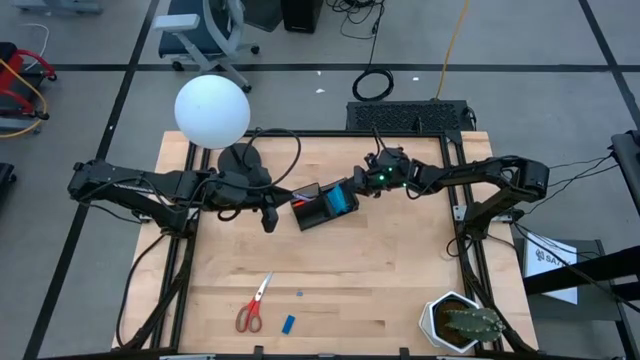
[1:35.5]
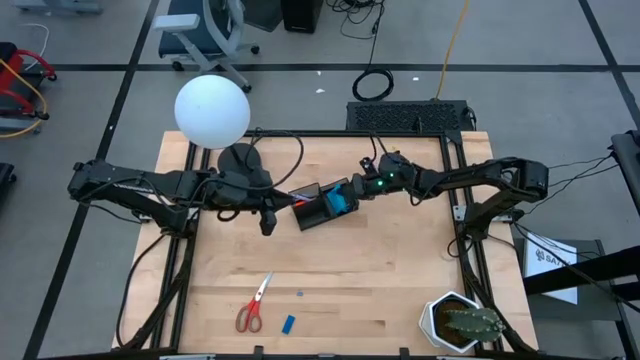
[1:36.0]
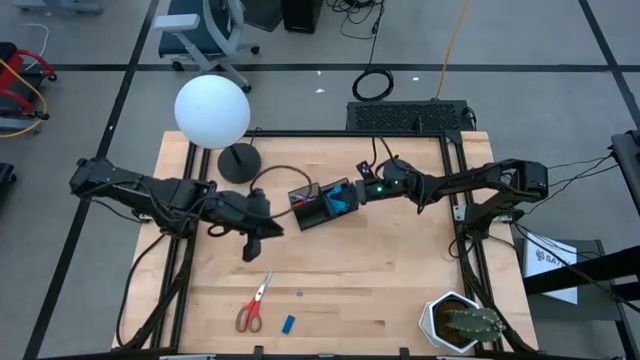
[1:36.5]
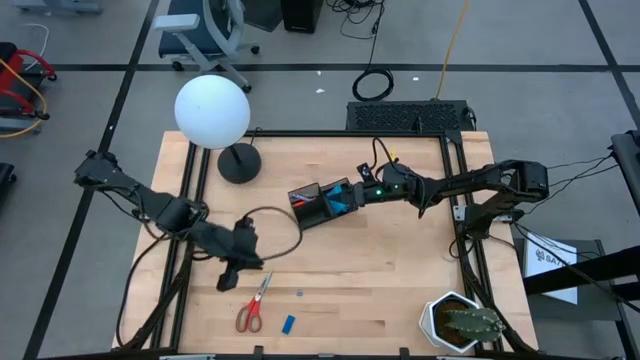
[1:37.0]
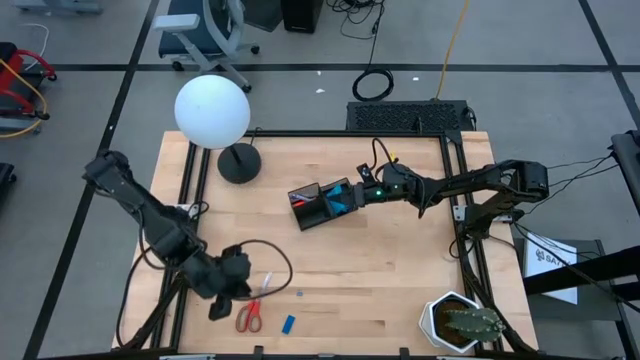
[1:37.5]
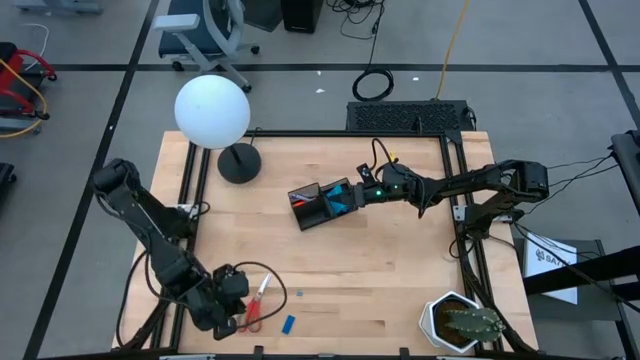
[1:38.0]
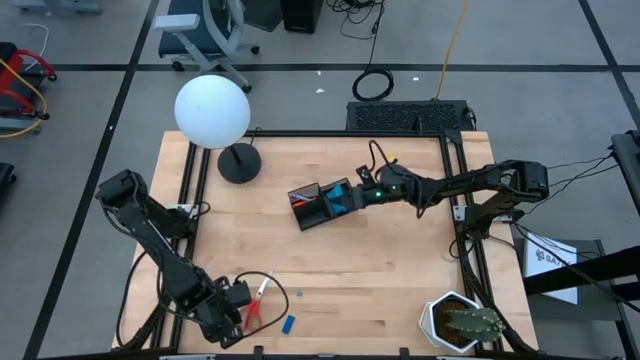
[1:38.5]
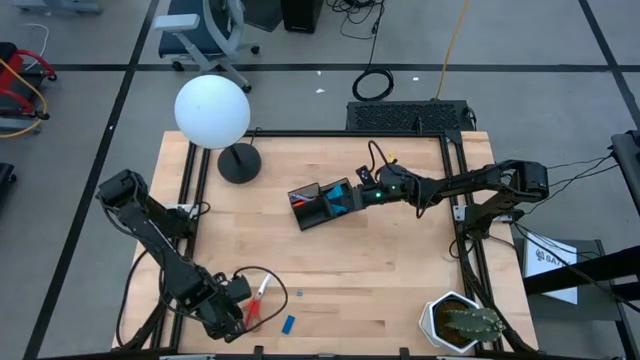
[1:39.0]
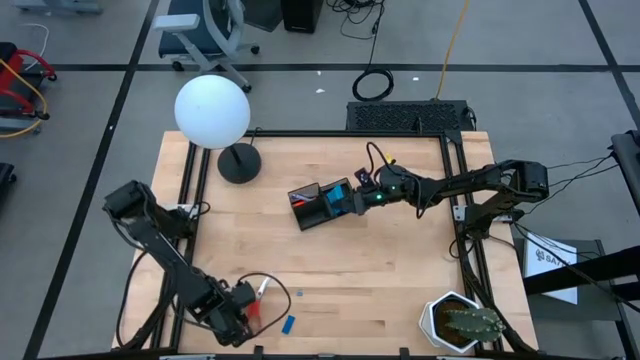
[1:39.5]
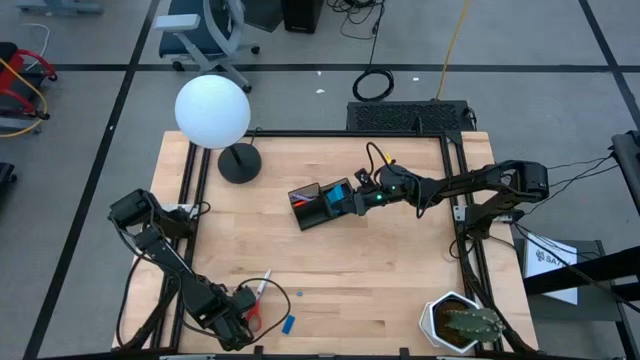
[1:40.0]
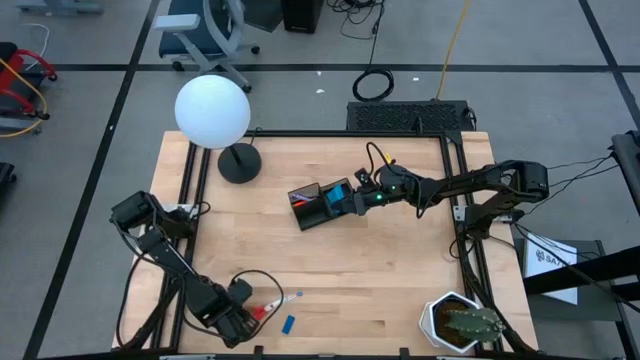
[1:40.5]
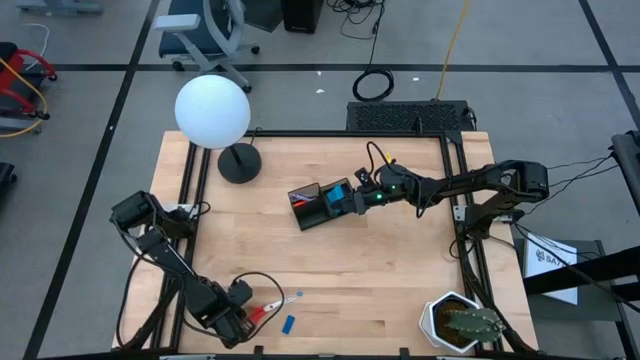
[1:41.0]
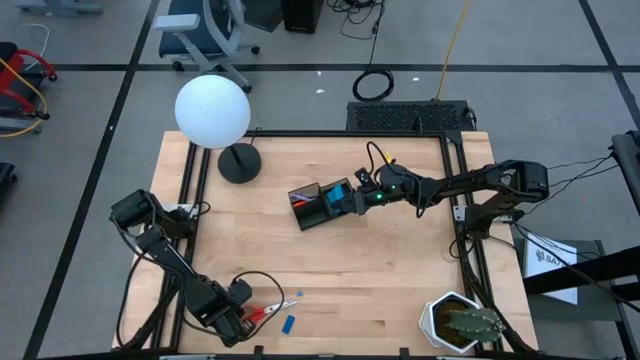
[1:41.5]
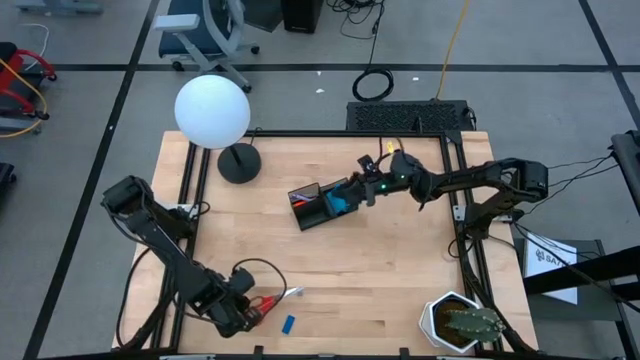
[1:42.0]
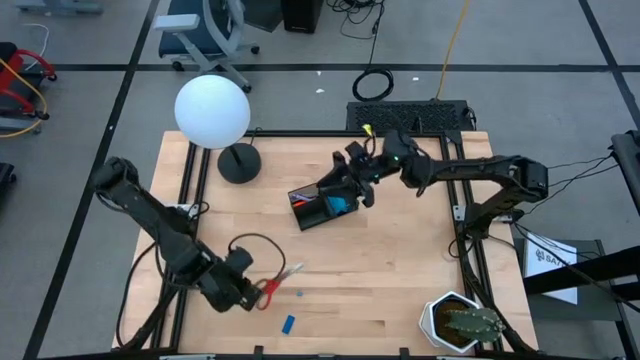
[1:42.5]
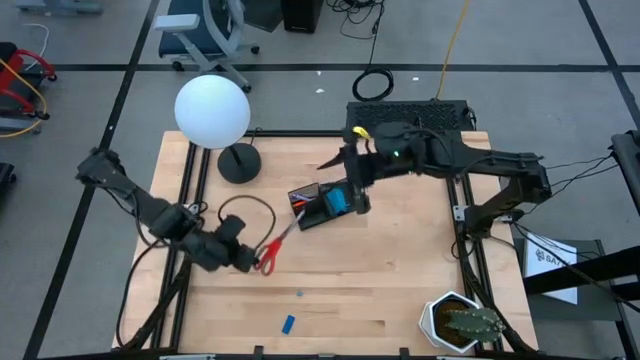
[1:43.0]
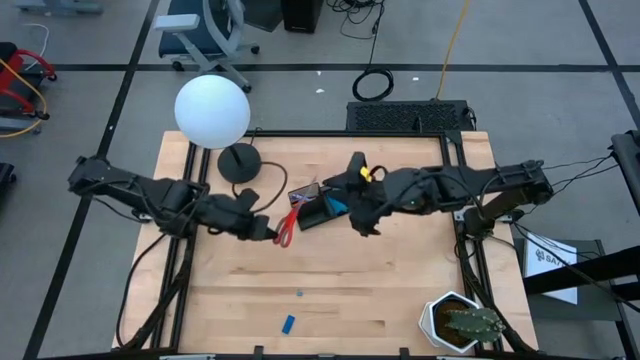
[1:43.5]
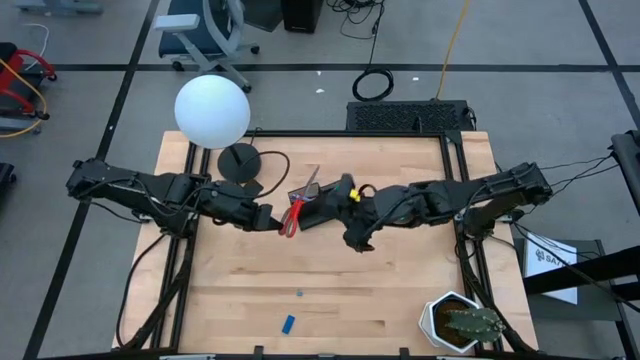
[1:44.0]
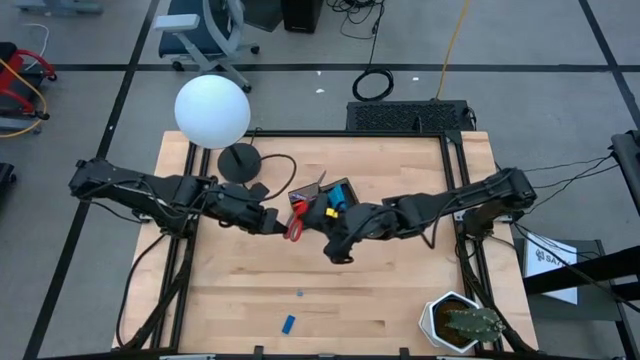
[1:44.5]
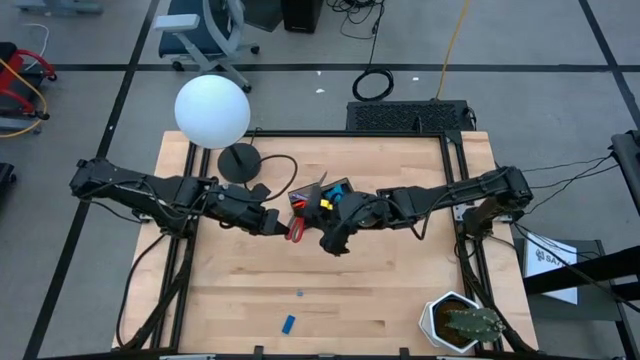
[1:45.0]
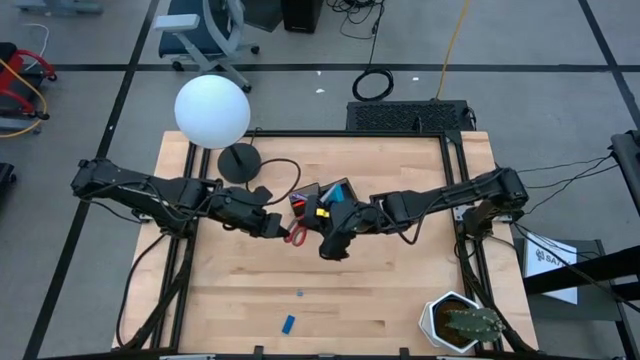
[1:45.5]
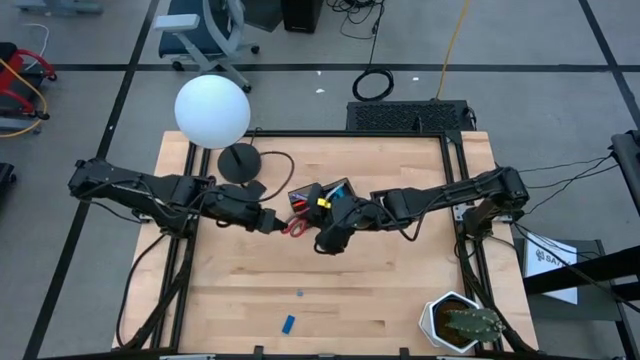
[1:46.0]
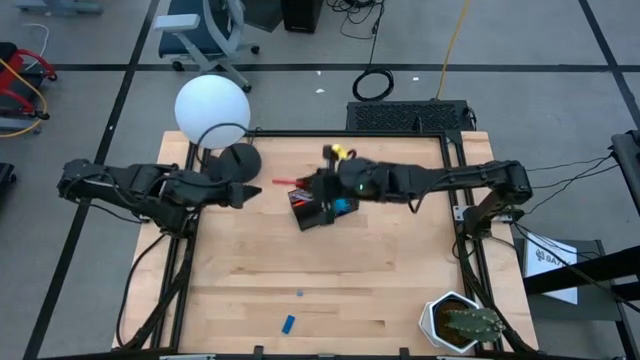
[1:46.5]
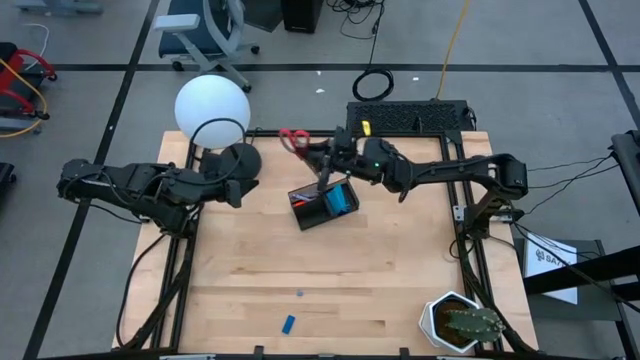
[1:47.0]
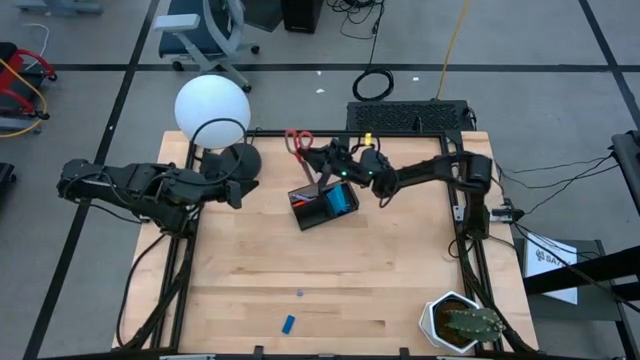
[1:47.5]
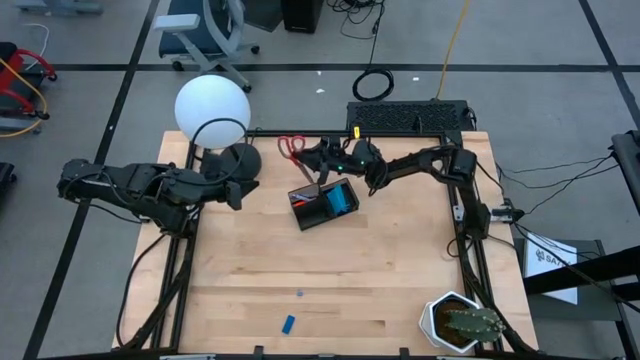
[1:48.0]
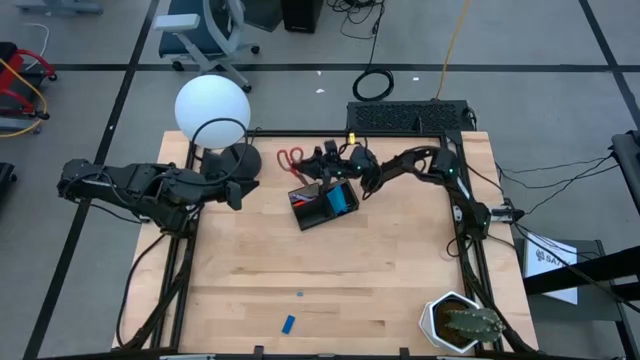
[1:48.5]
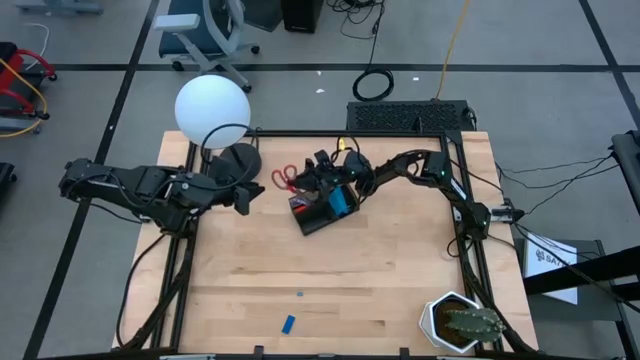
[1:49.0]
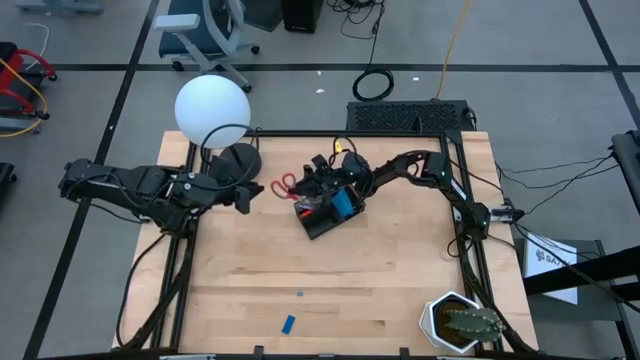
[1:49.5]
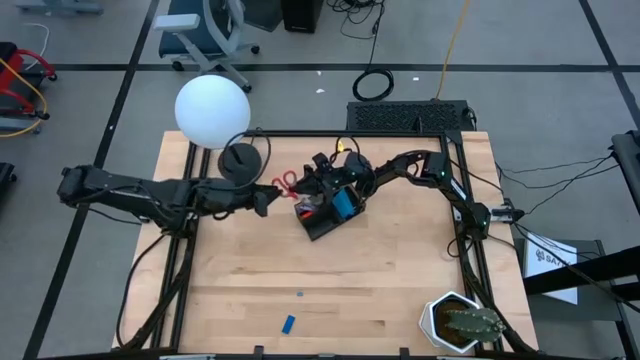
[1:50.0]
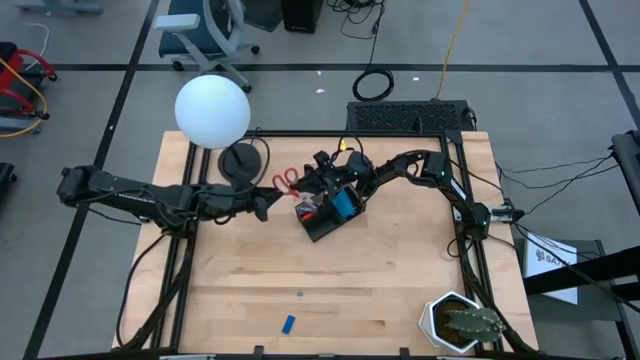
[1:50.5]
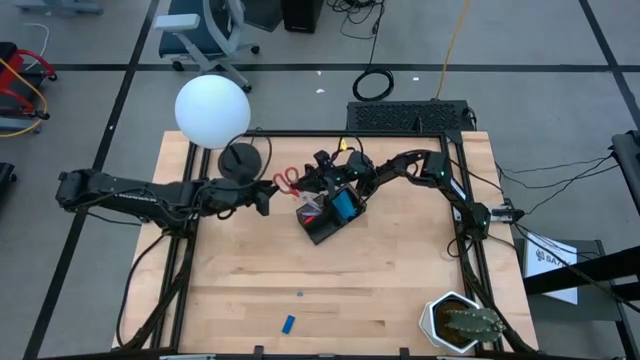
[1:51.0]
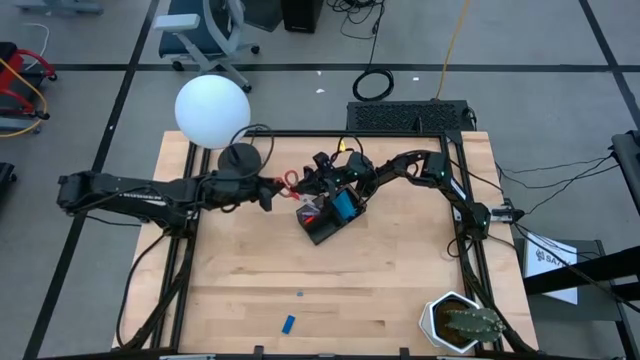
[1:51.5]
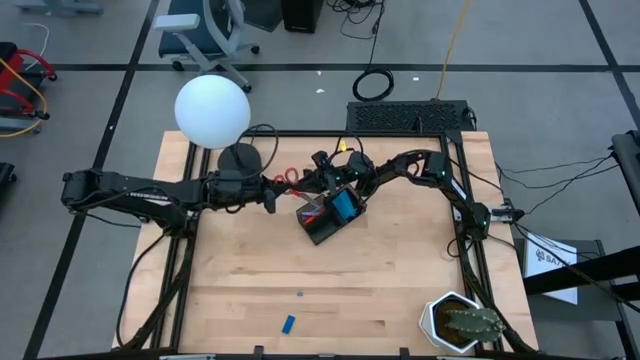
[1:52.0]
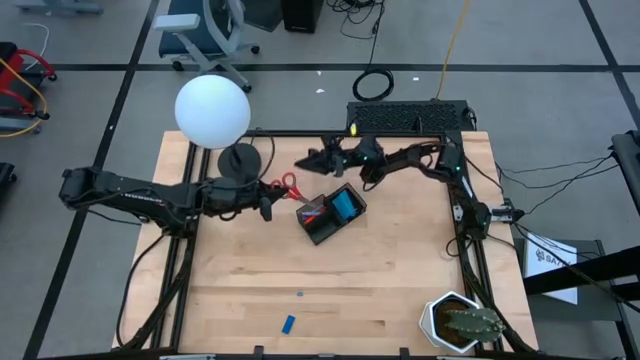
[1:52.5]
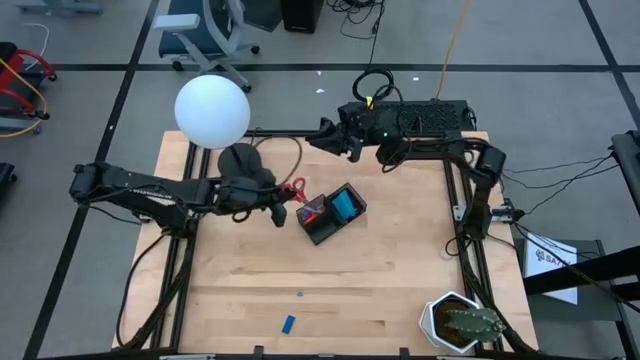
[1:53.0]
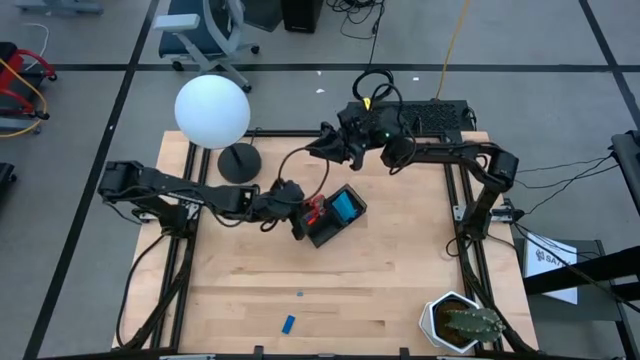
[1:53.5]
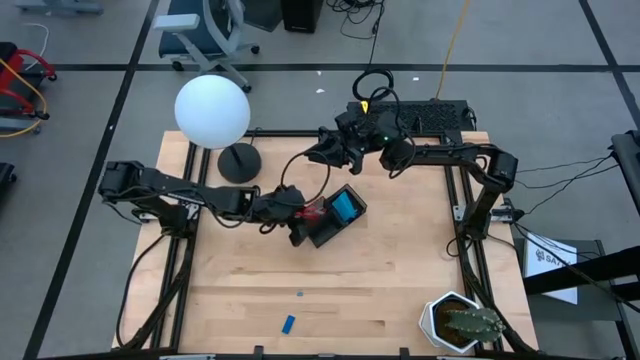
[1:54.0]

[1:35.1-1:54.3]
Task: Pick and place office supplies into organizer
Put the orange scissors into the desk organizer

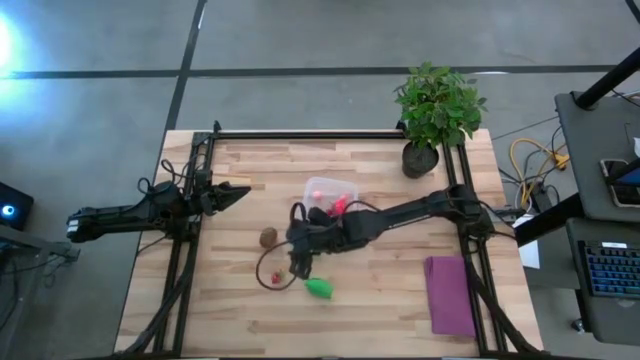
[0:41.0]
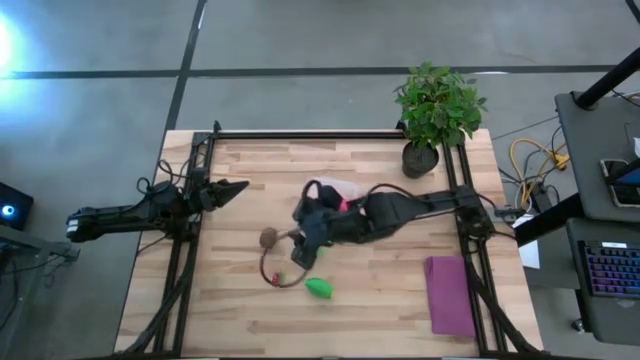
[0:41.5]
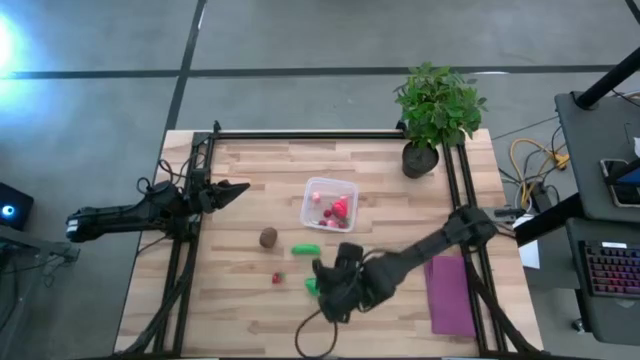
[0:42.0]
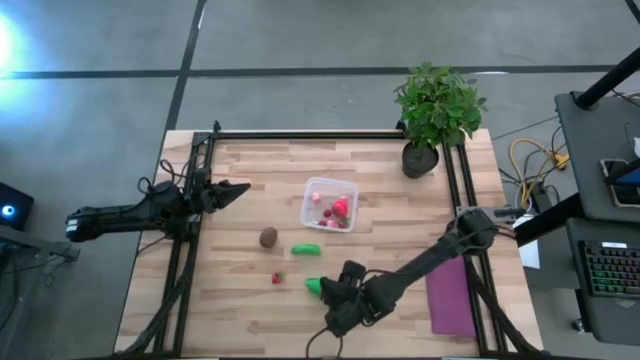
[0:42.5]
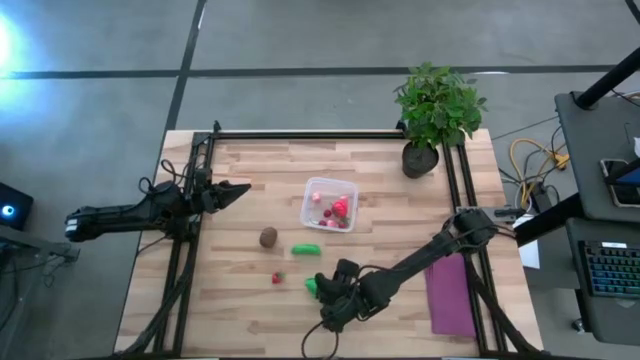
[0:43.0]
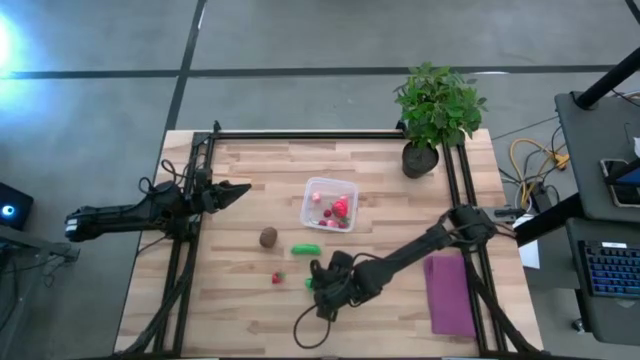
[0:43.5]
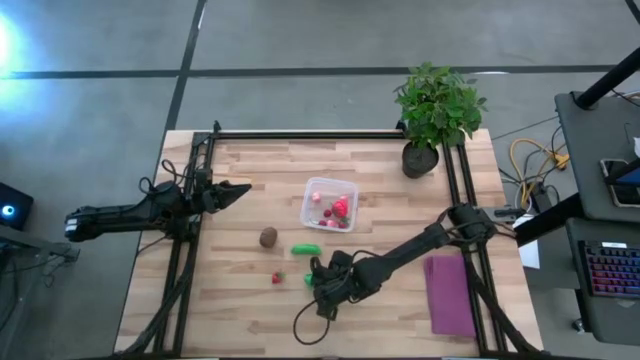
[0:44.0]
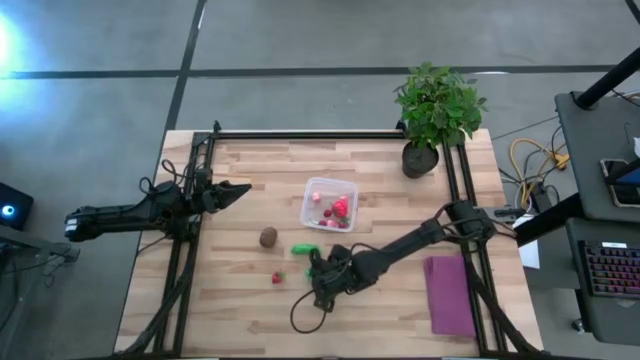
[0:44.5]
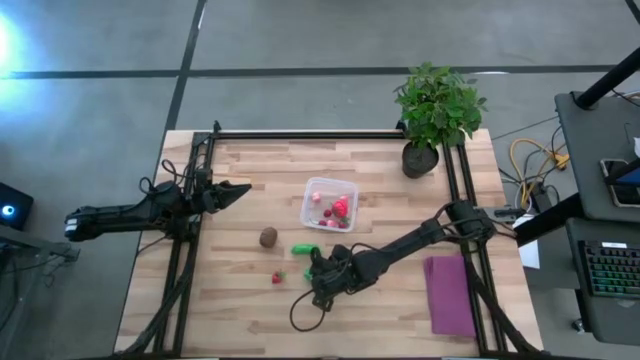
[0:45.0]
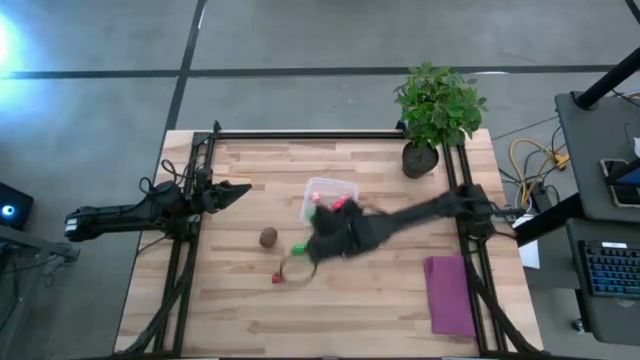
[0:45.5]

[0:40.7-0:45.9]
Task: Pick and placing Produce into tupperware
Put the green corn into the transparent bin
